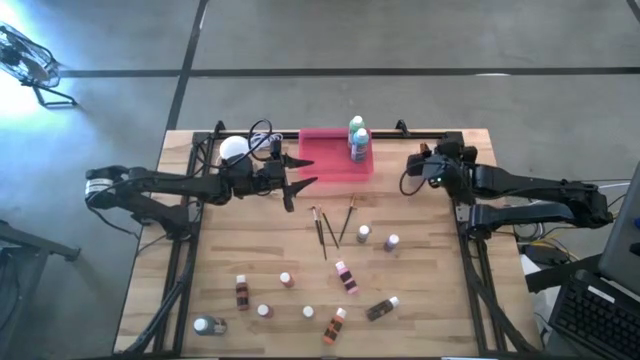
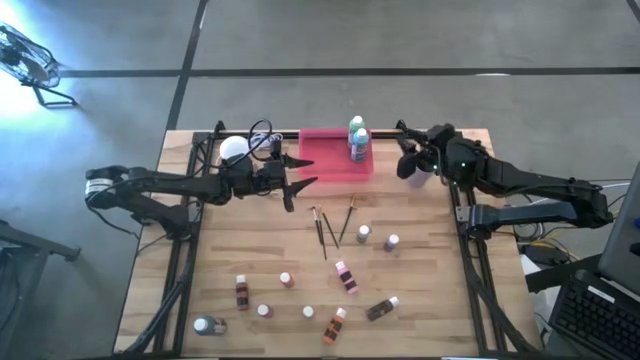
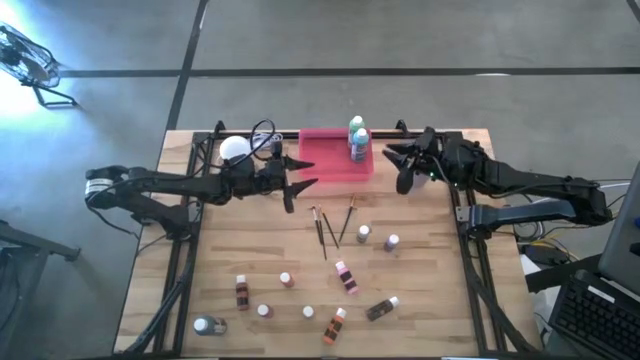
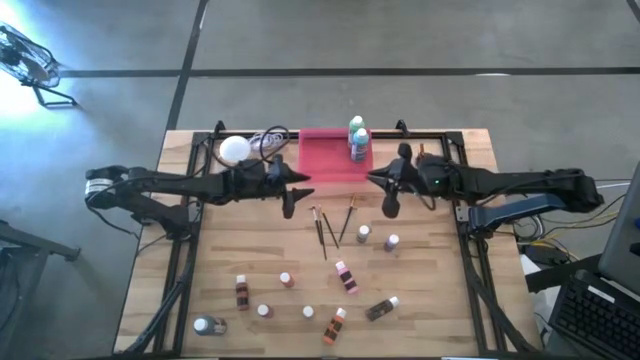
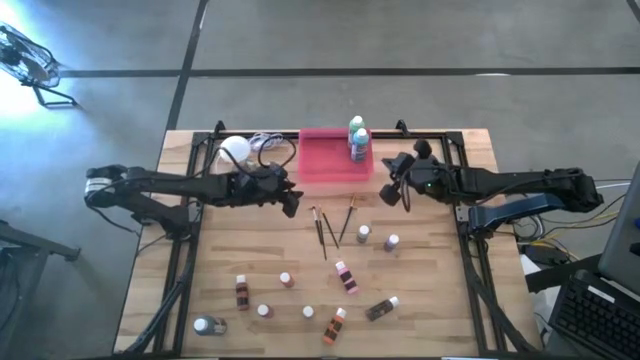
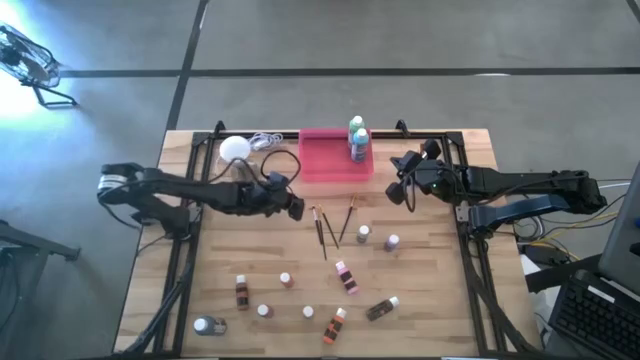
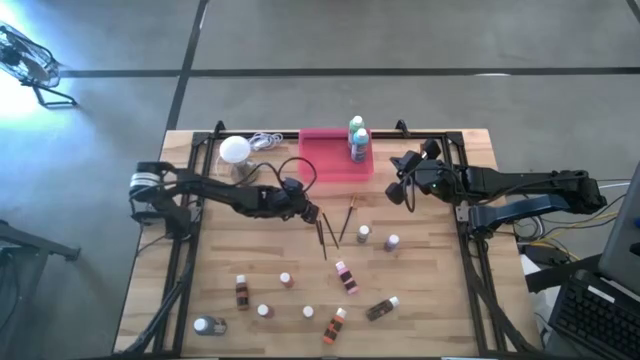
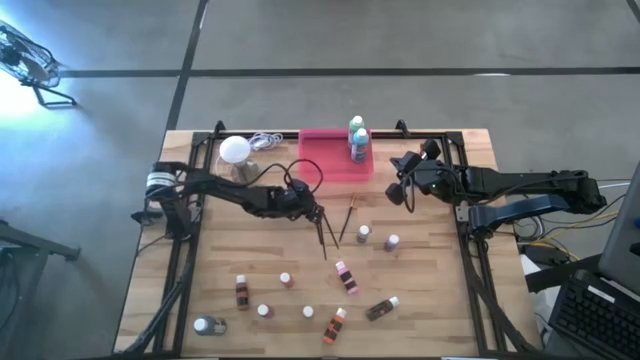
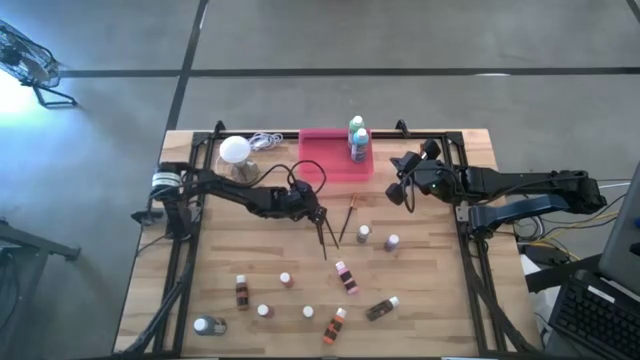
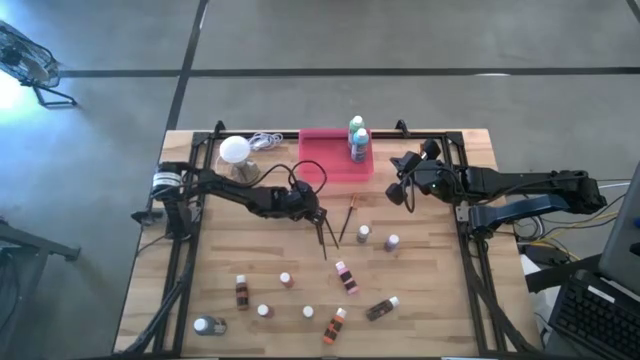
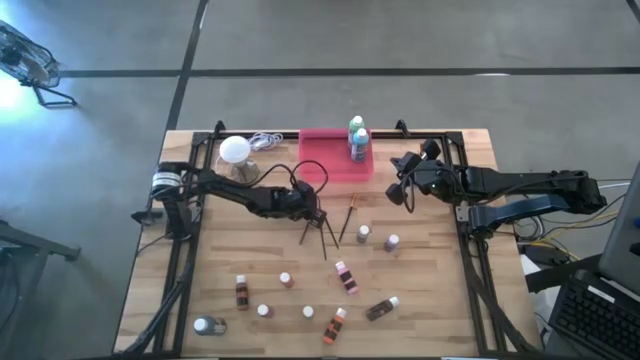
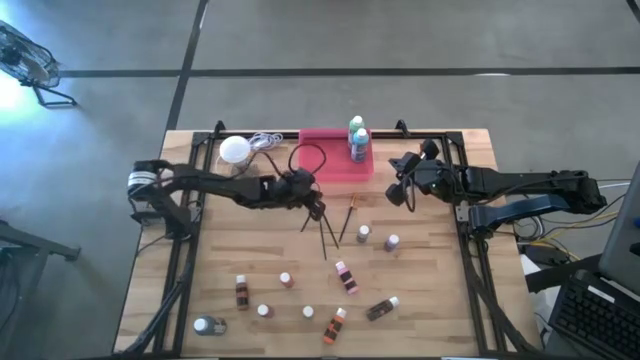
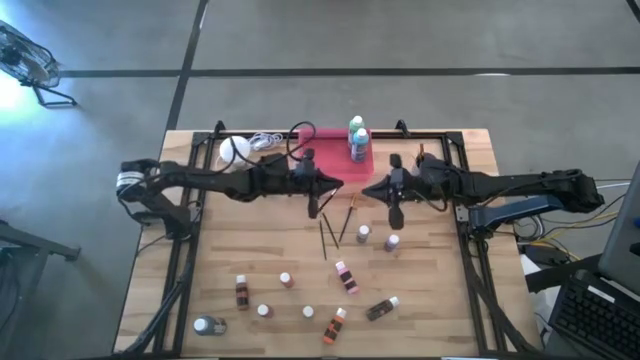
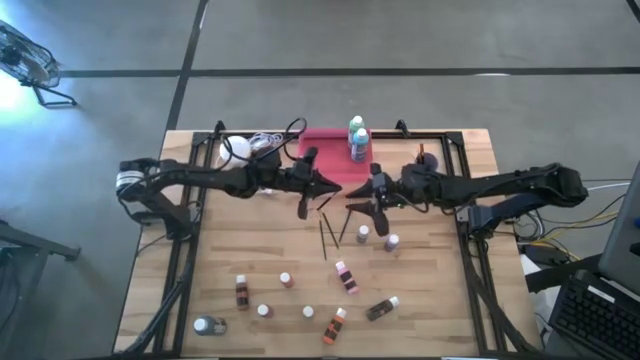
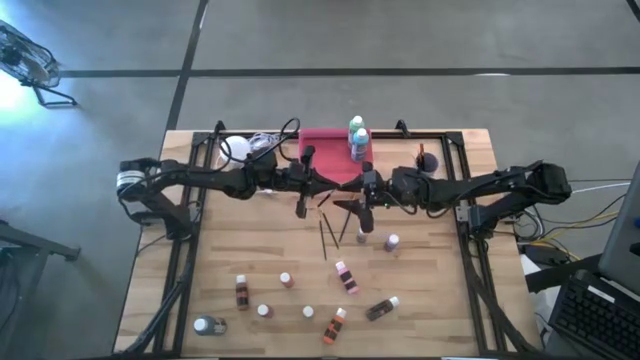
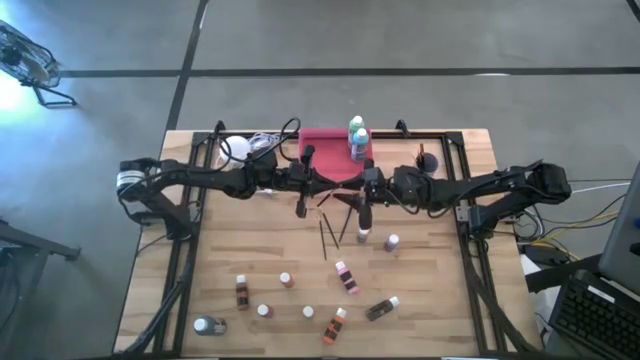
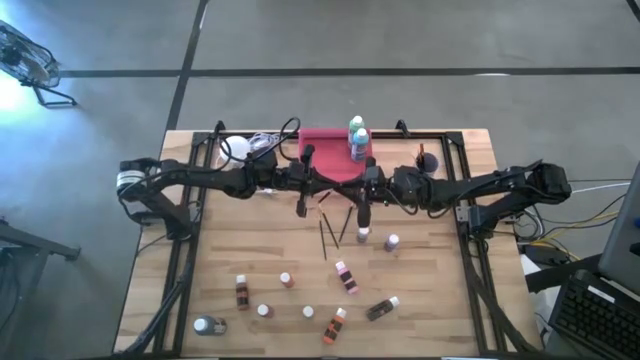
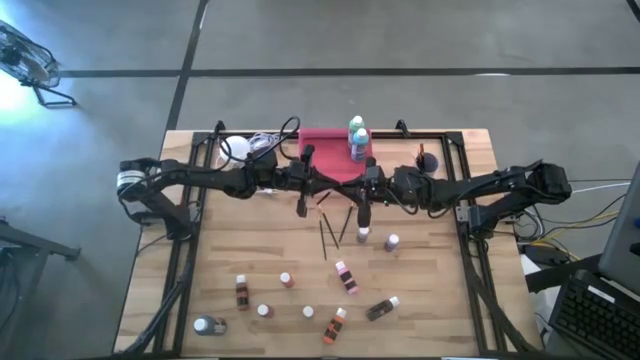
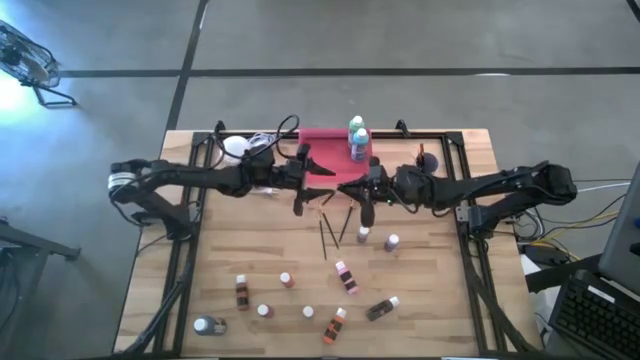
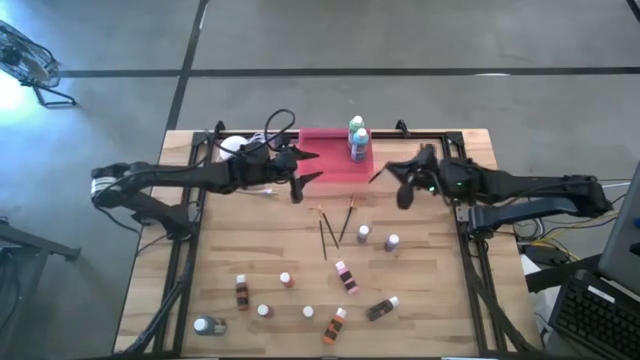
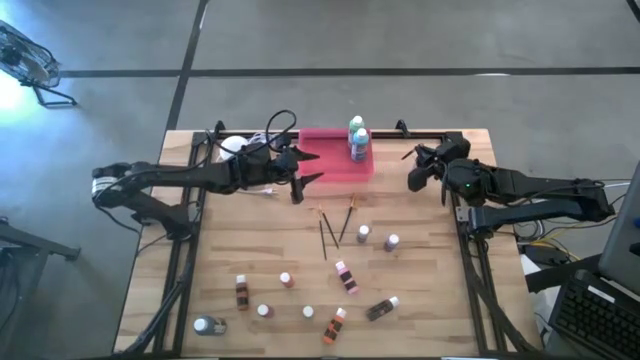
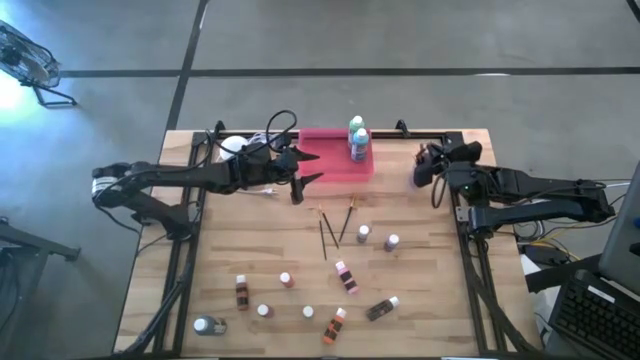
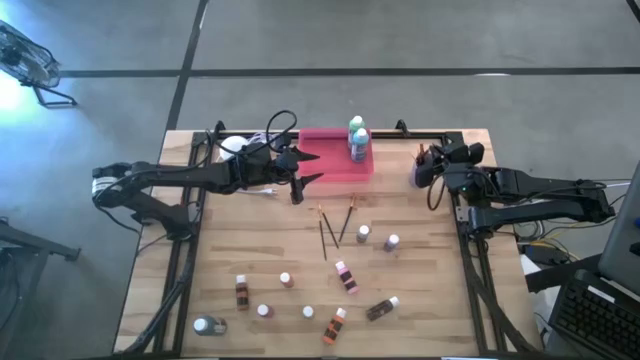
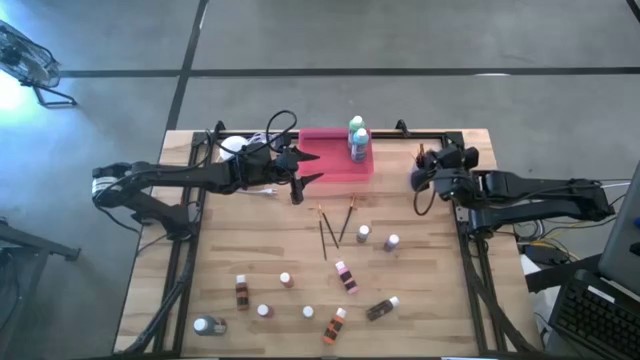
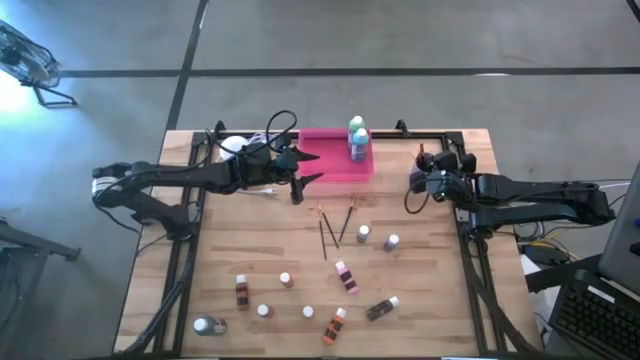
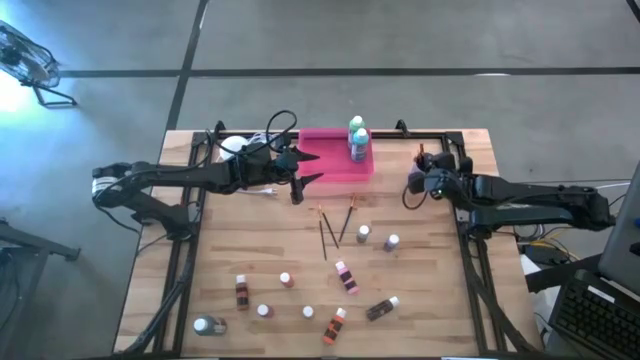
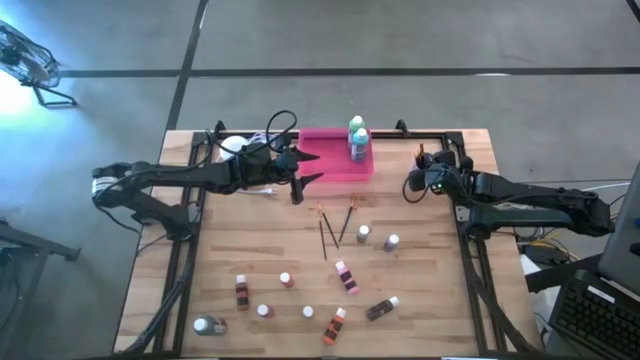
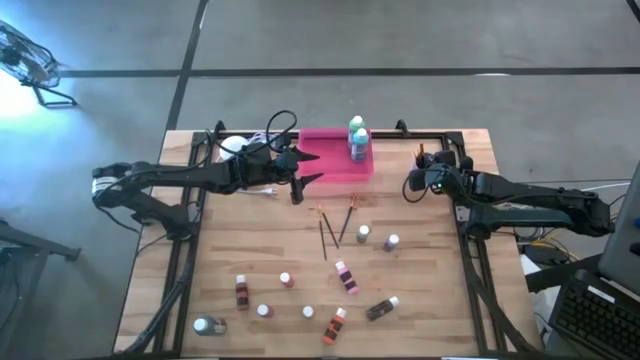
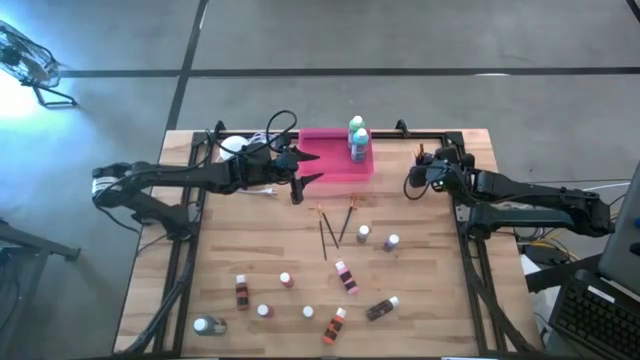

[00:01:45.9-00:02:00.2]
Task: Pick & Place Paint Supplies
Put the black silver paint brush into the violet cup

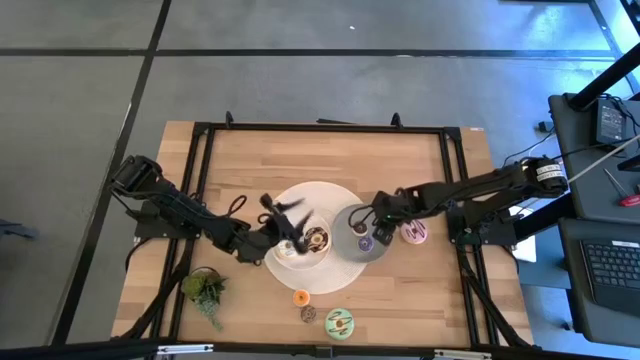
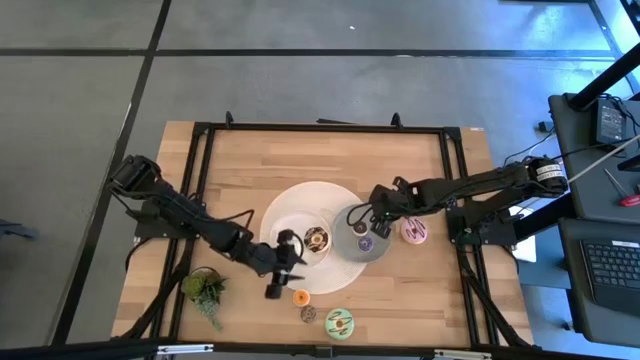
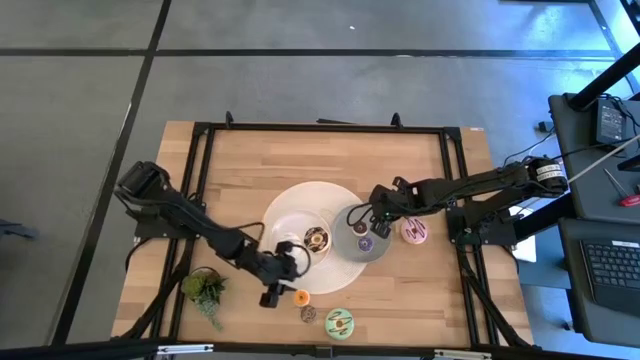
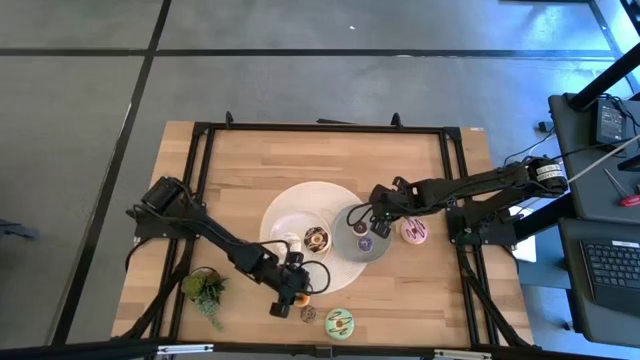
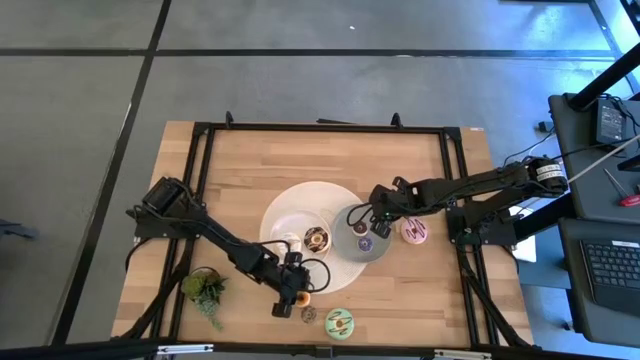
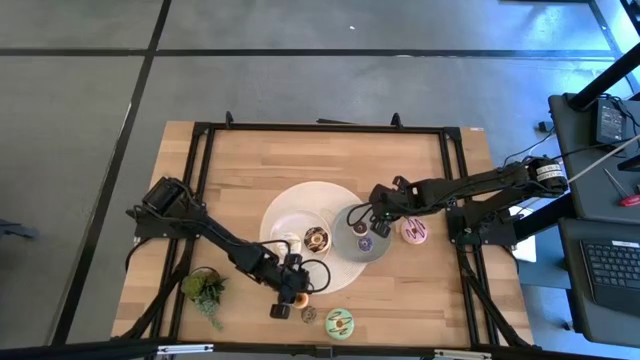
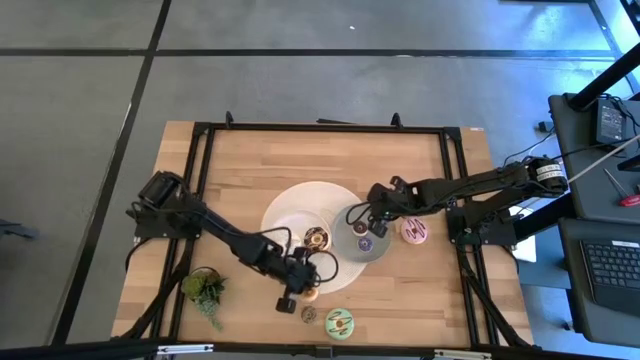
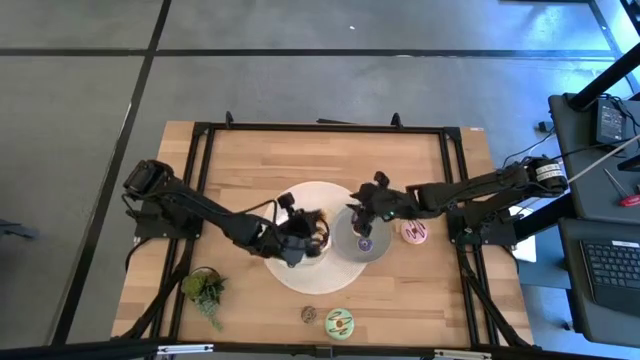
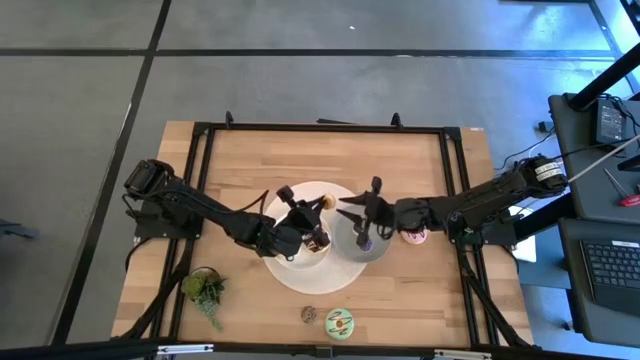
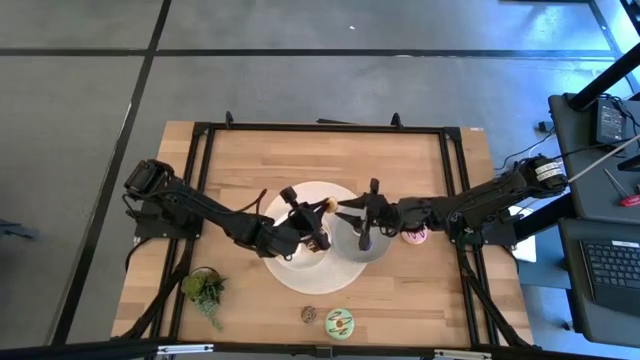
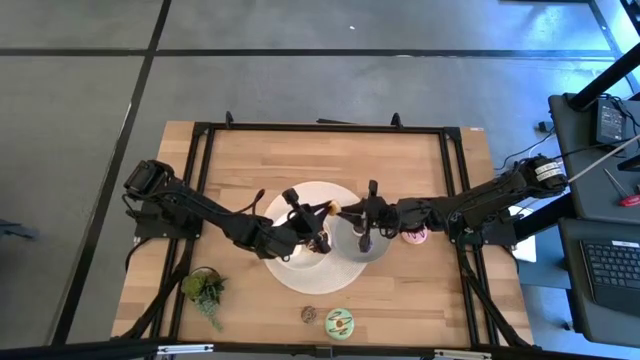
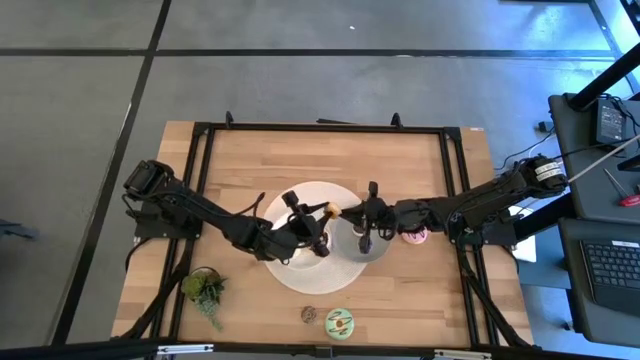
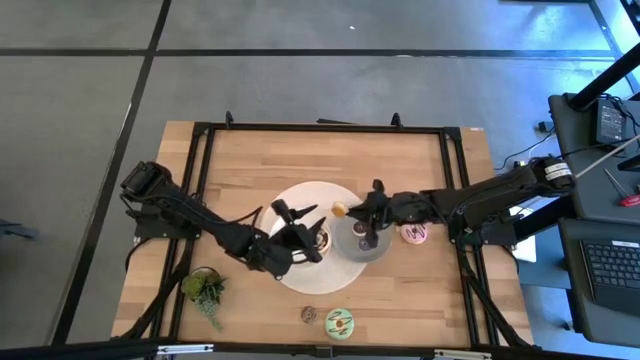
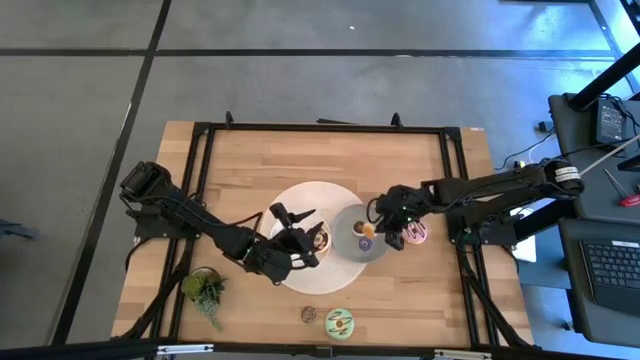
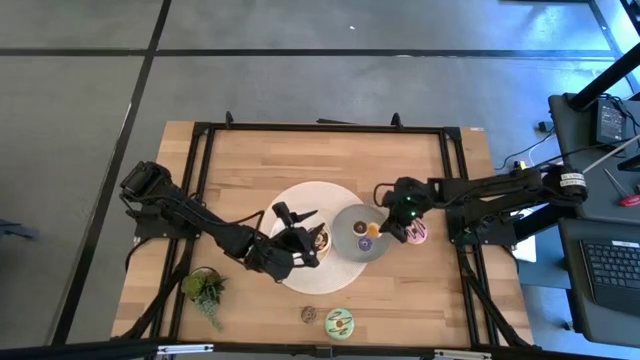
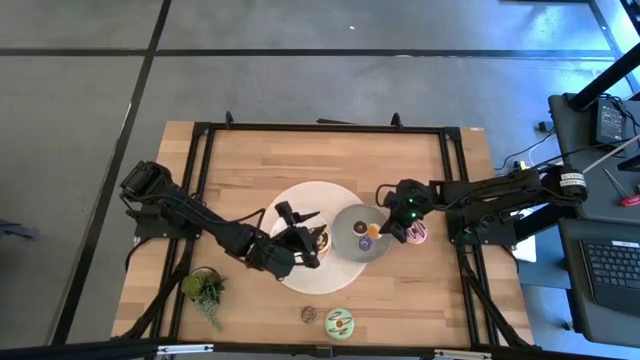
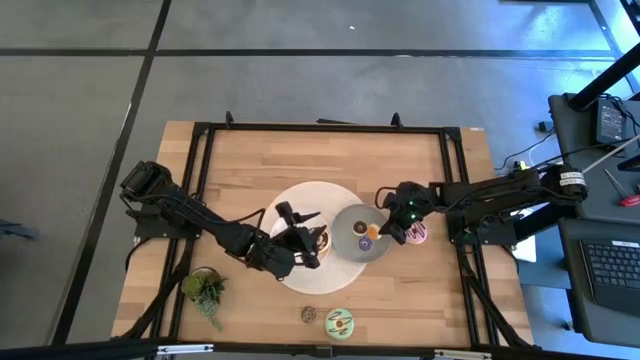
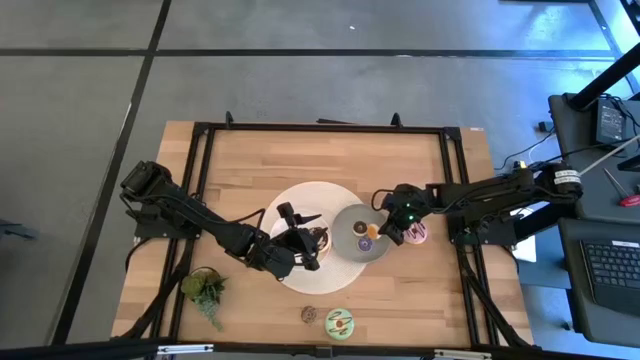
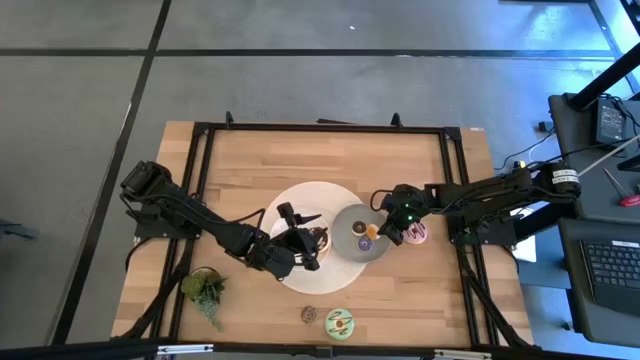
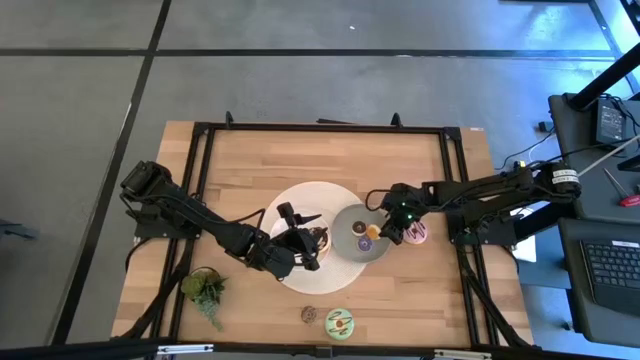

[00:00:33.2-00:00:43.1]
Task: Pick & Place donuts
Put the small orange donut on the gray plate
